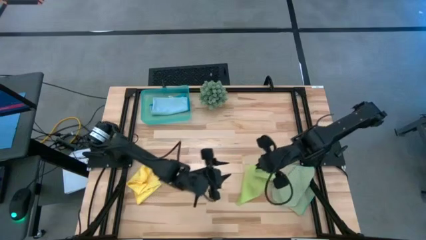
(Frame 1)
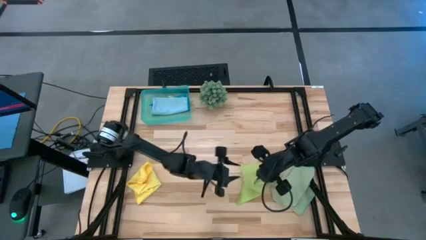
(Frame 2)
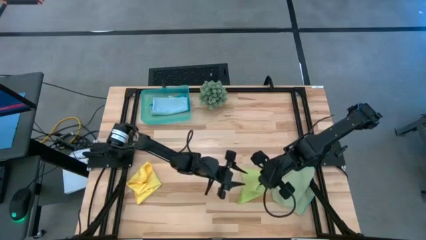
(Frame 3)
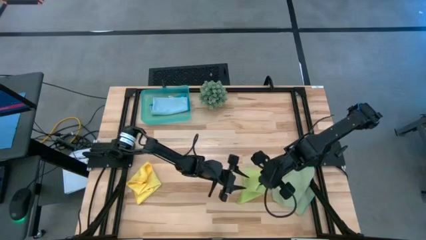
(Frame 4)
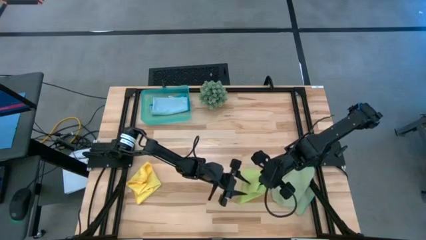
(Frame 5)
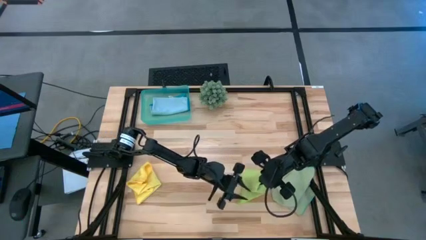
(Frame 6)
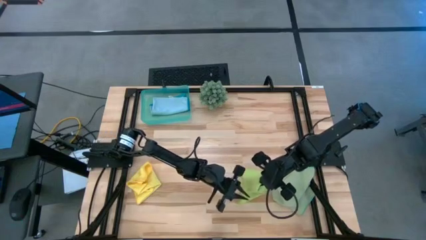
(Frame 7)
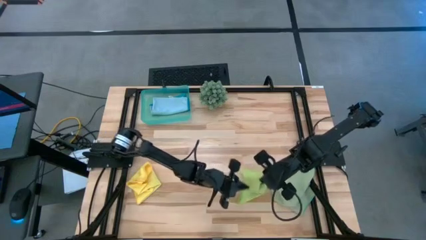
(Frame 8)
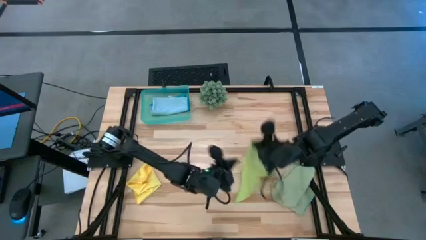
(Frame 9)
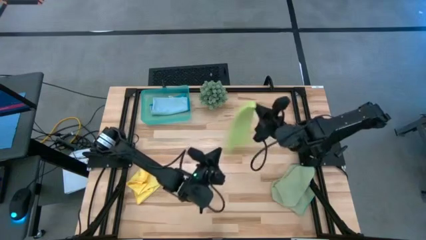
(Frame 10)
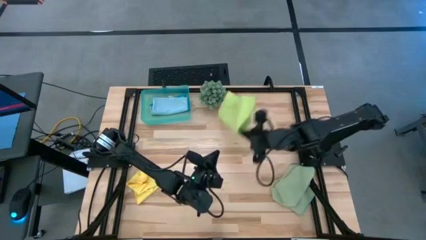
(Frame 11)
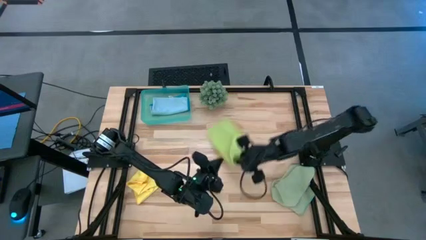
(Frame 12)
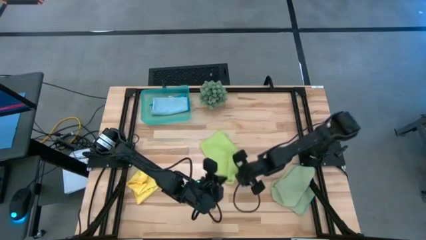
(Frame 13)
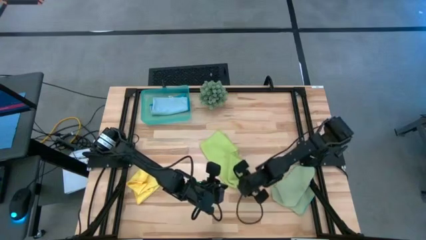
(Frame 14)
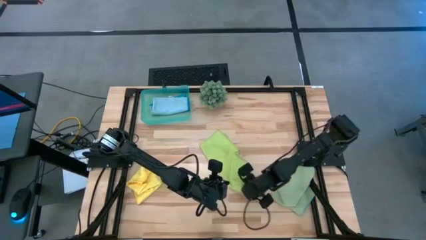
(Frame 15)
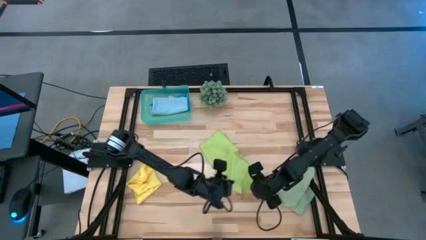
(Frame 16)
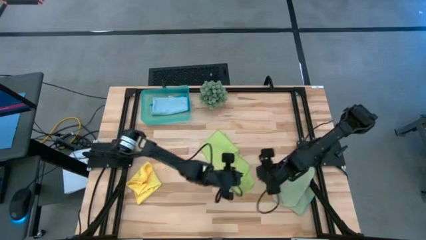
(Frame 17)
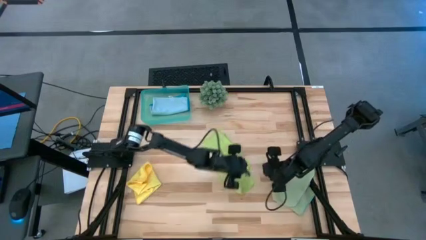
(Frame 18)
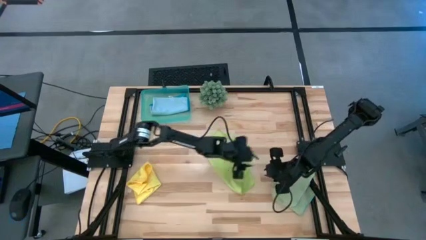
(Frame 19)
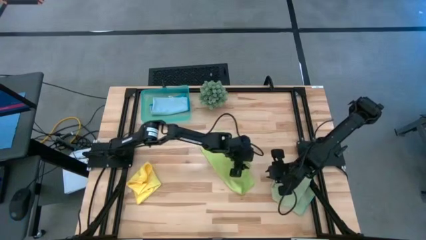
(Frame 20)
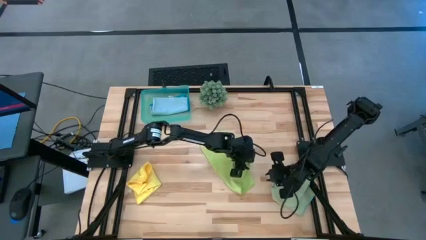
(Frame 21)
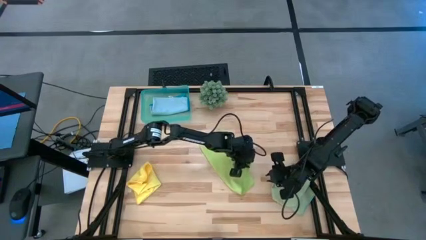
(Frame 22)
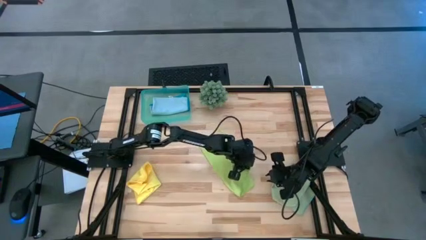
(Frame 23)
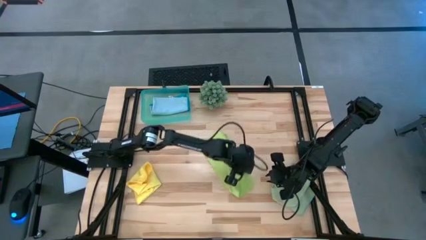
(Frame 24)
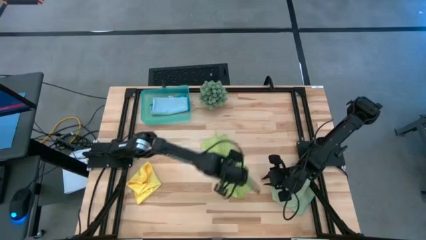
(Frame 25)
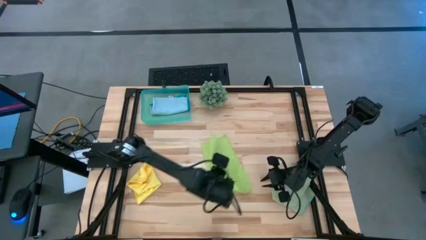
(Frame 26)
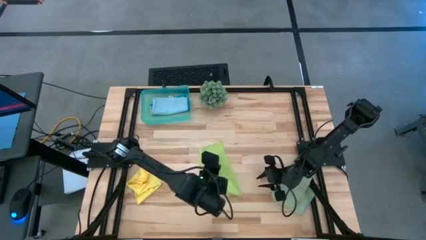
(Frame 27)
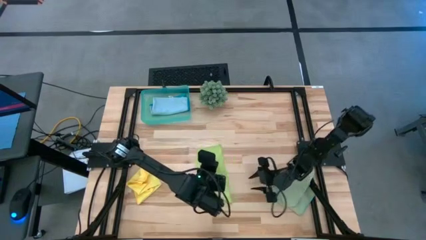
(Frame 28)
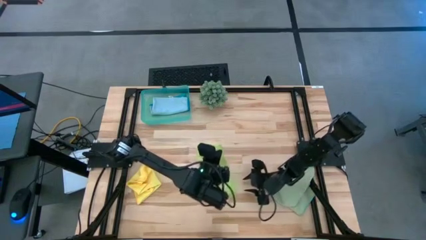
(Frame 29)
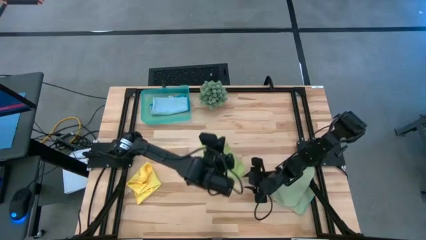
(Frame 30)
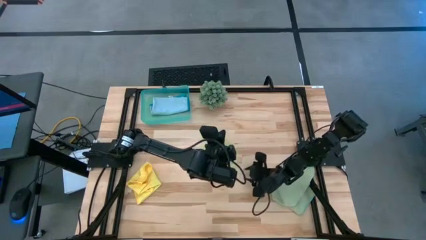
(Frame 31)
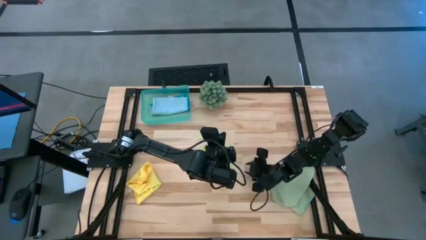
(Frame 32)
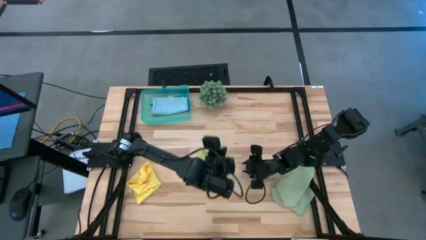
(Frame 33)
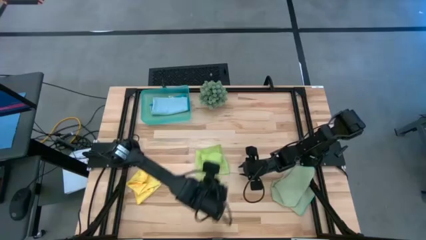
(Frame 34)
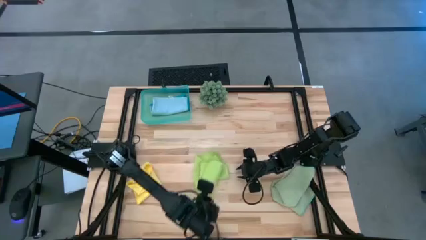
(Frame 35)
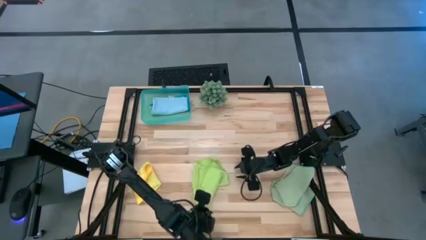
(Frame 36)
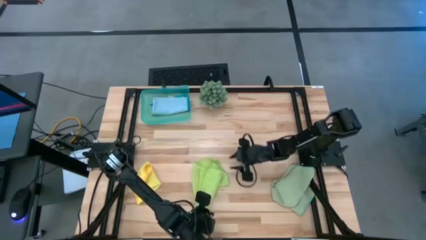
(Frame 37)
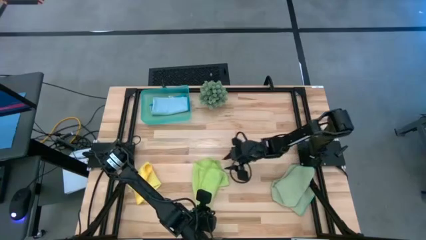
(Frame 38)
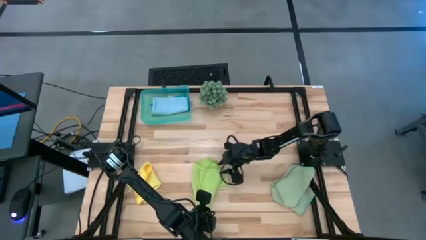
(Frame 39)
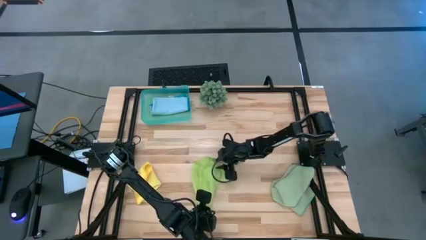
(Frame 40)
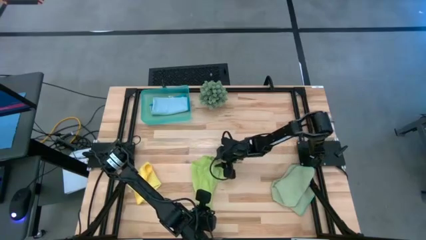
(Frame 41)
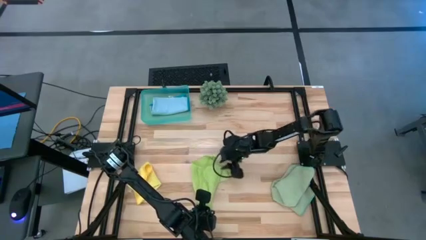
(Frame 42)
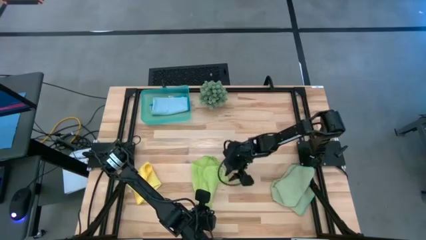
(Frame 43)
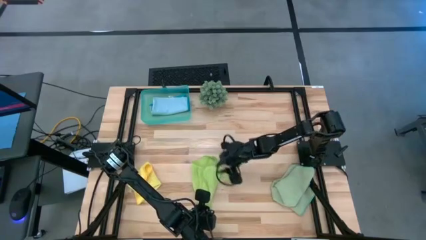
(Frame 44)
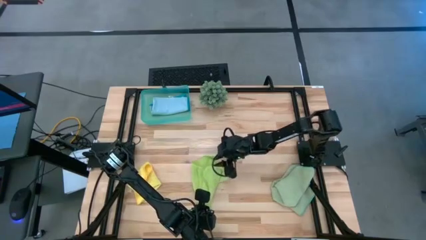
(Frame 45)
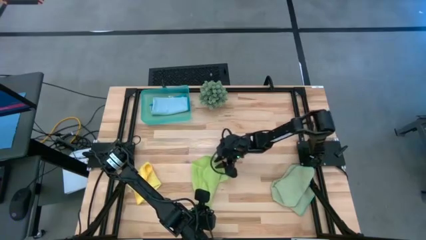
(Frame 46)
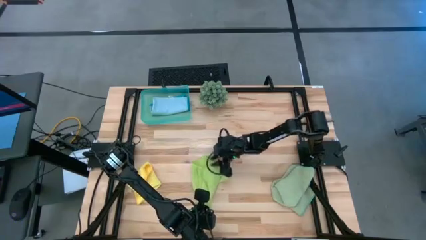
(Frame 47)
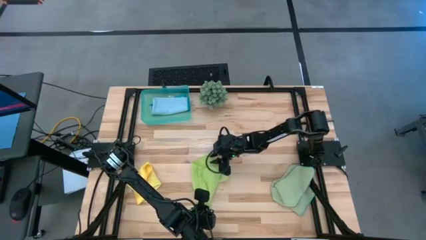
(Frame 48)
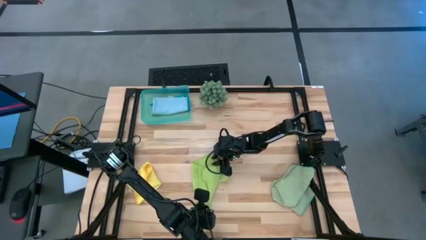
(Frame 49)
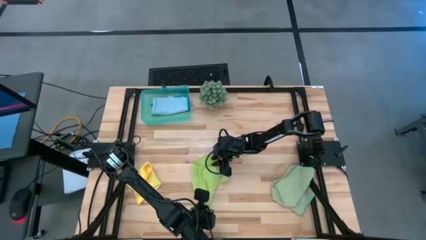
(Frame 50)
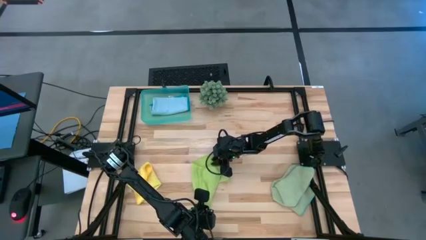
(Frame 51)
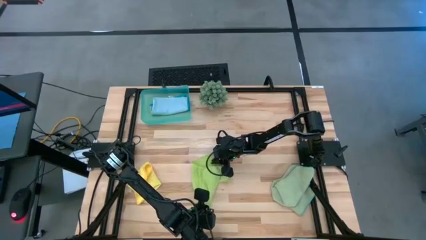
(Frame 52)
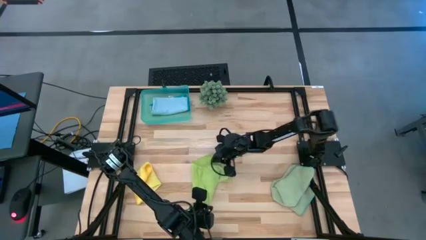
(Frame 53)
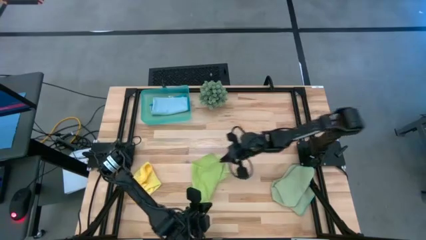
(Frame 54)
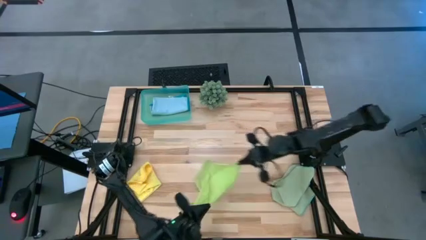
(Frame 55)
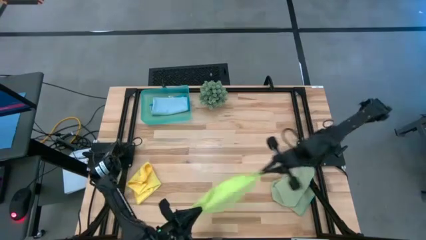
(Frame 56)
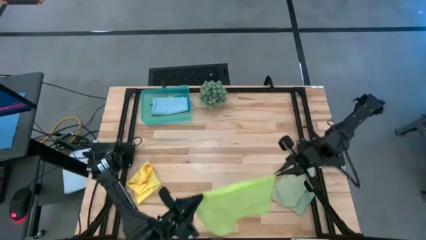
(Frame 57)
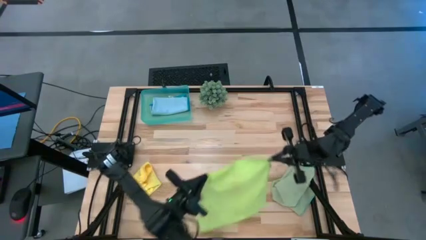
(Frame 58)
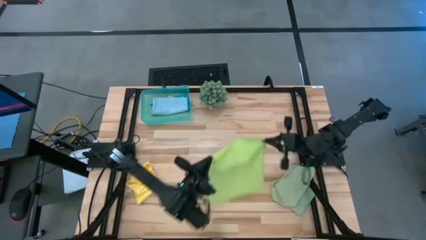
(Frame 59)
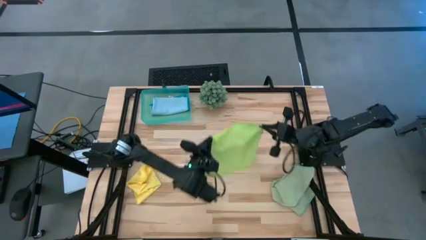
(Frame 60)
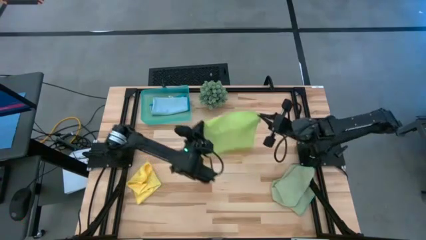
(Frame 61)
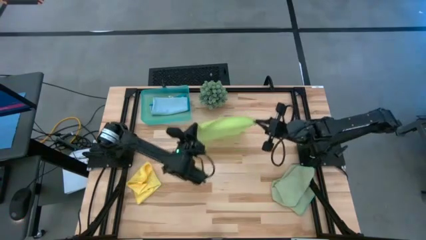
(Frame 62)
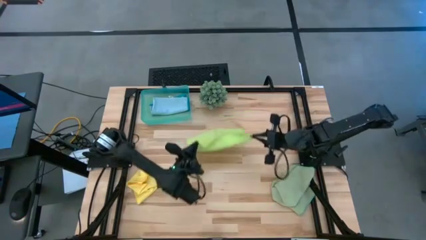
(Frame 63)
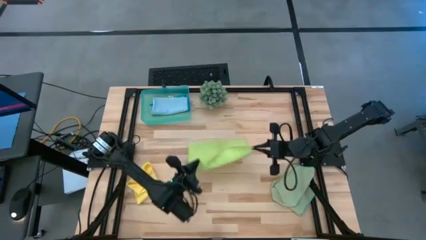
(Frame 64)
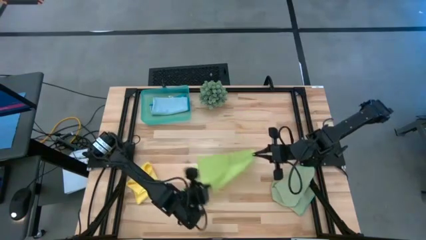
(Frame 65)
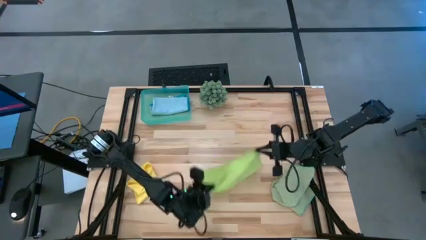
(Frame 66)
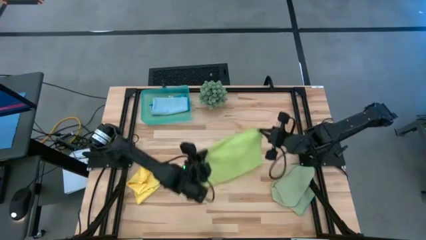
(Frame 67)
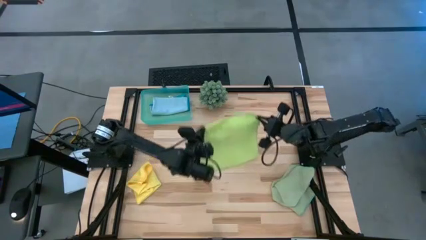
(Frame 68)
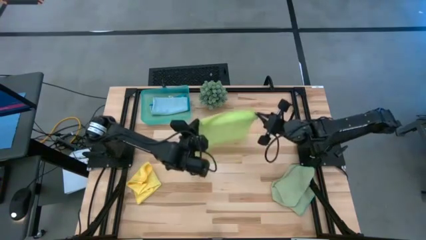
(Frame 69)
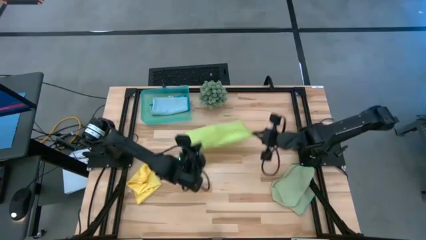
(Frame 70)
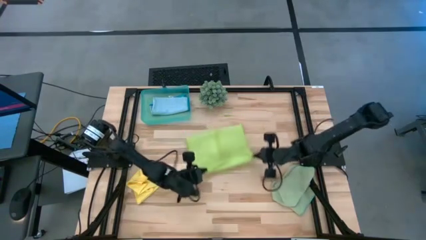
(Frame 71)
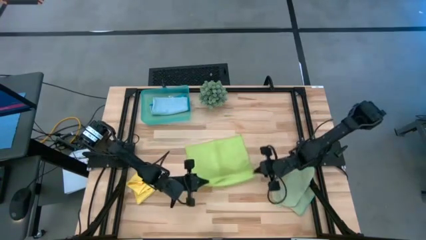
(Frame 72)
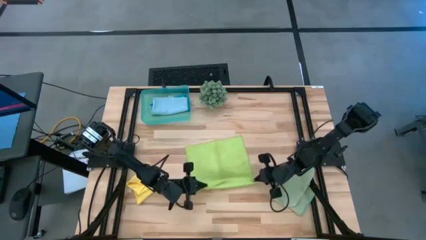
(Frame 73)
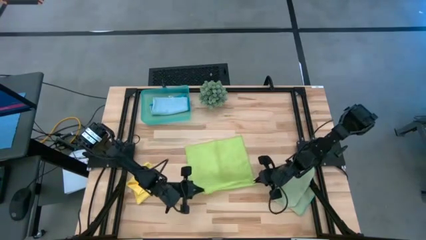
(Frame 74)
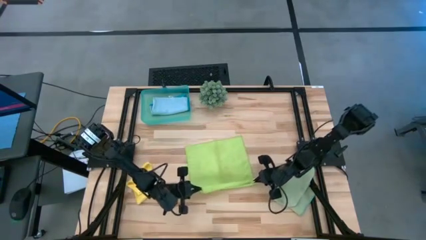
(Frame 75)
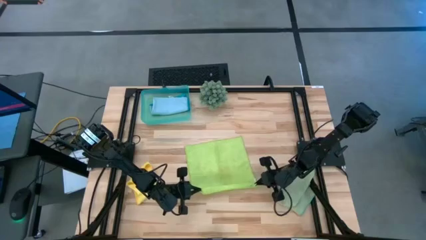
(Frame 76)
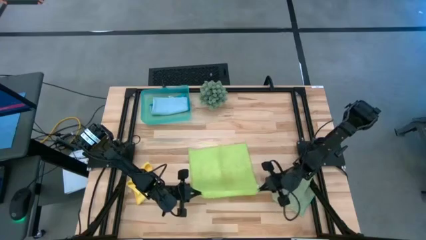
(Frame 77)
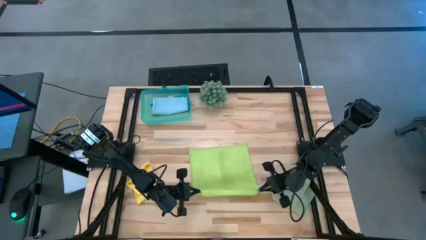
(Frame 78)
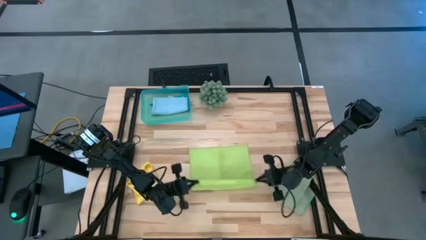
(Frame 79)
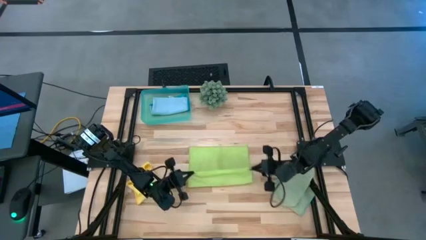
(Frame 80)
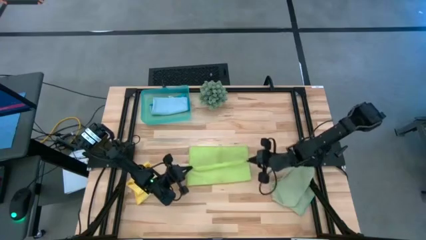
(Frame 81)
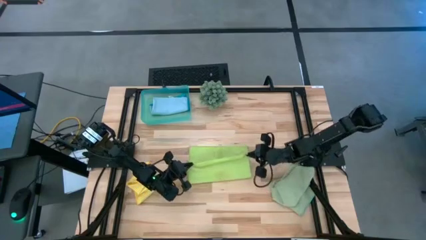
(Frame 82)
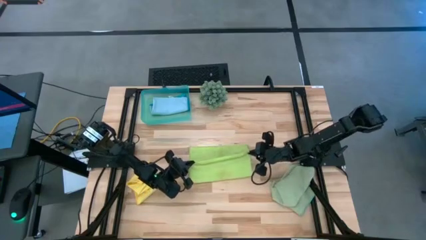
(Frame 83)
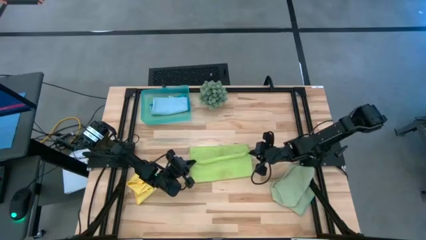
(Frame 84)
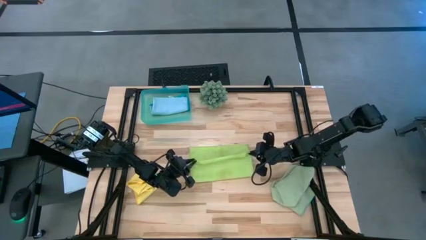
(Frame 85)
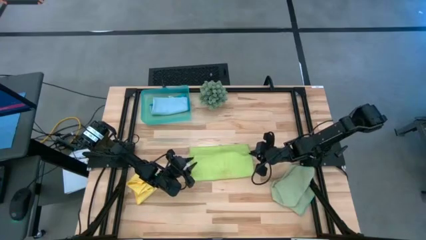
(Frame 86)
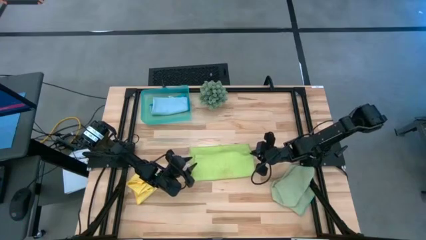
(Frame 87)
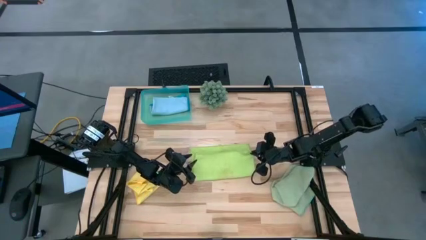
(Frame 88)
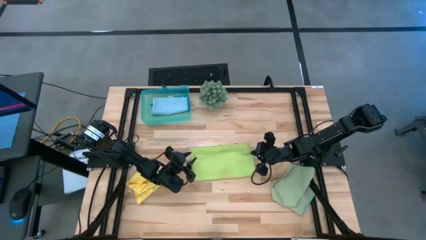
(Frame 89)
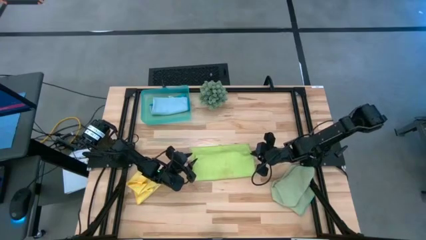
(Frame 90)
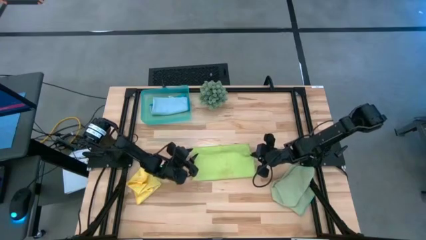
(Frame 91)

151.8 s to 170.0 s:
Task: Fold microfiber towels
Fold the light green microfiber cloth
